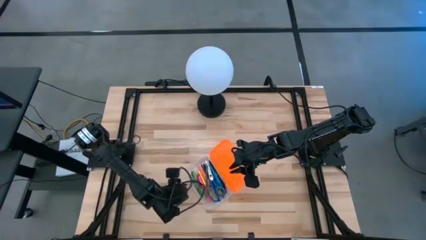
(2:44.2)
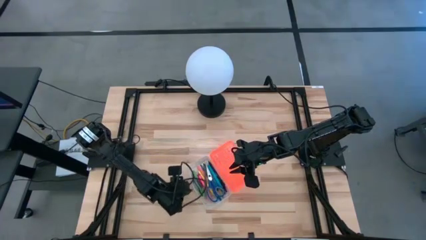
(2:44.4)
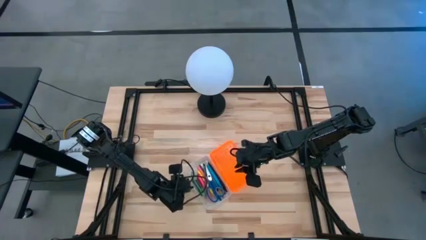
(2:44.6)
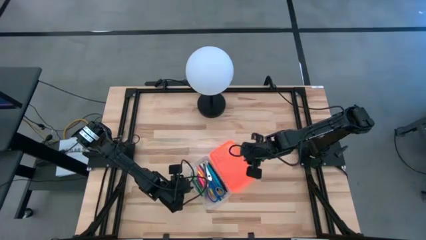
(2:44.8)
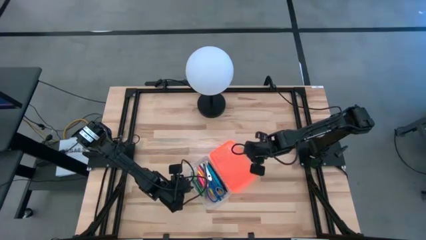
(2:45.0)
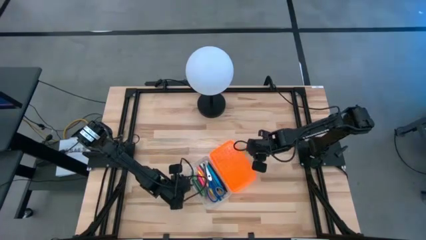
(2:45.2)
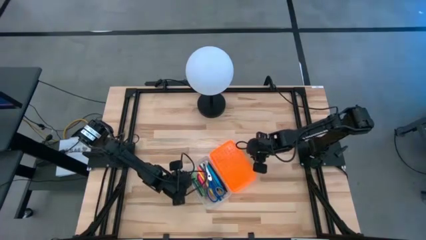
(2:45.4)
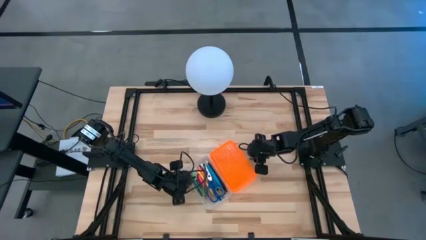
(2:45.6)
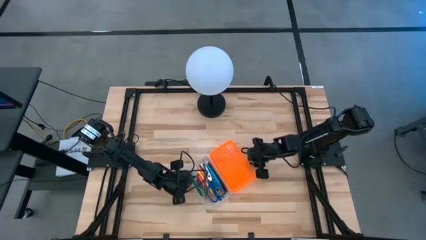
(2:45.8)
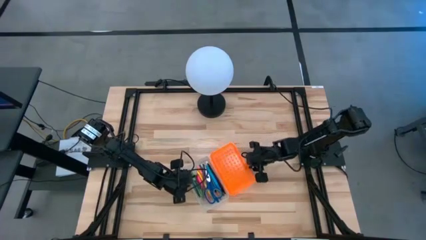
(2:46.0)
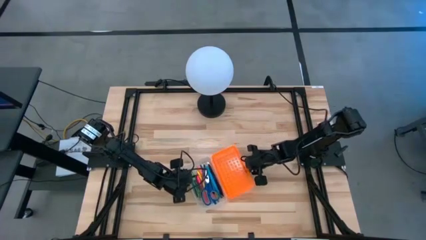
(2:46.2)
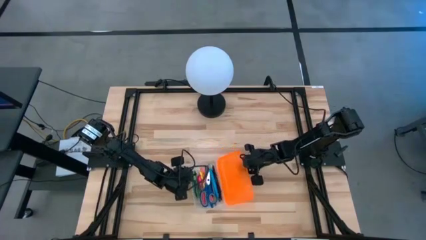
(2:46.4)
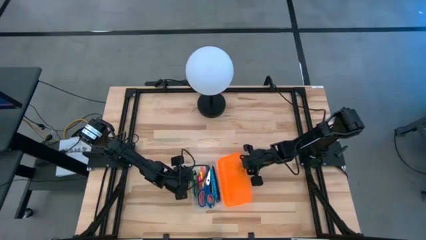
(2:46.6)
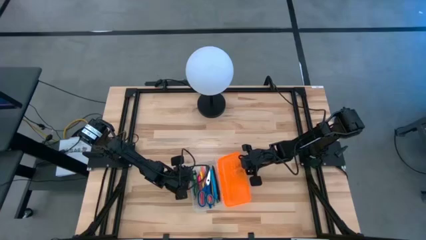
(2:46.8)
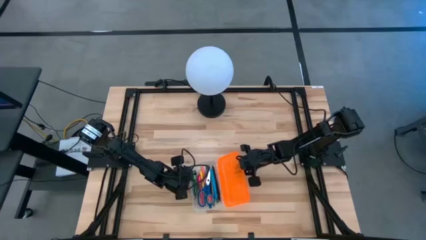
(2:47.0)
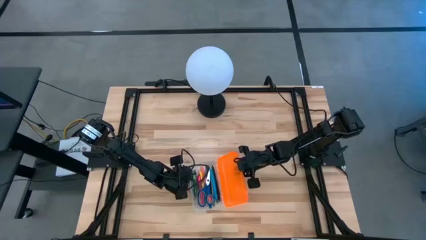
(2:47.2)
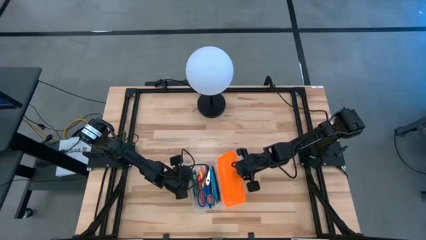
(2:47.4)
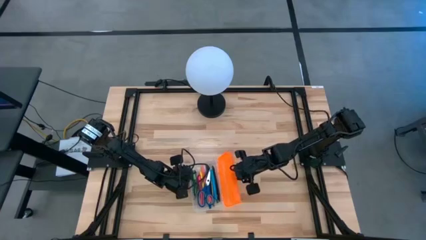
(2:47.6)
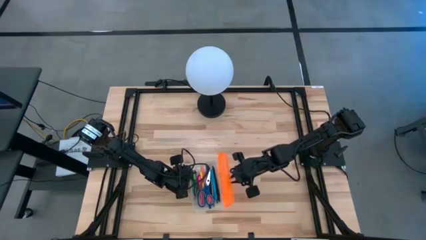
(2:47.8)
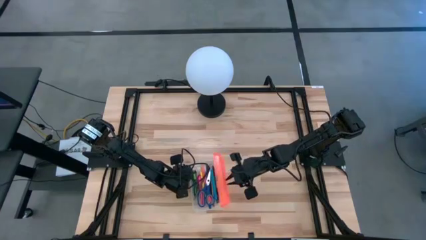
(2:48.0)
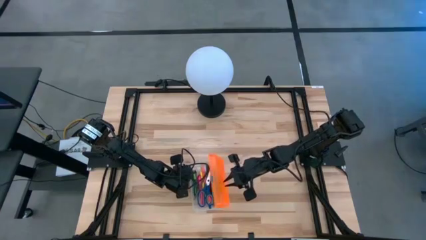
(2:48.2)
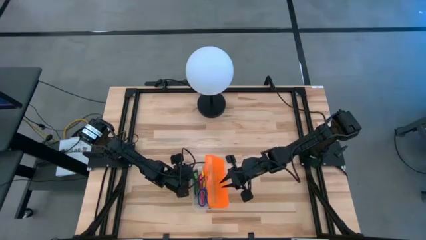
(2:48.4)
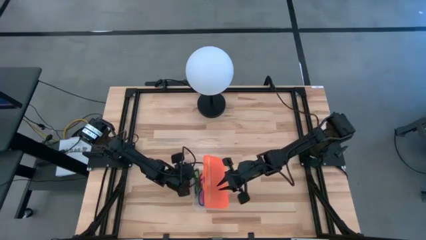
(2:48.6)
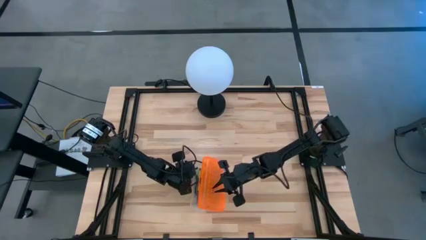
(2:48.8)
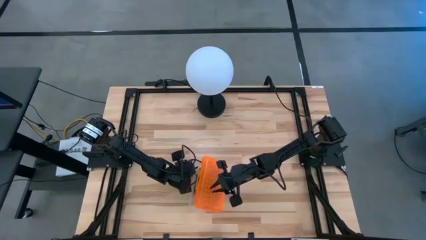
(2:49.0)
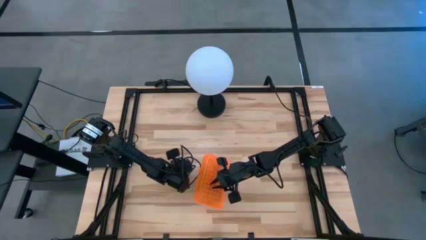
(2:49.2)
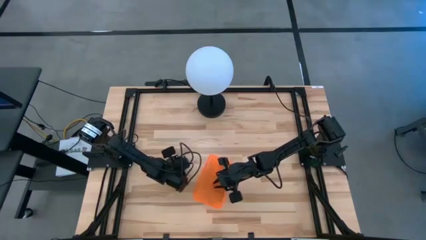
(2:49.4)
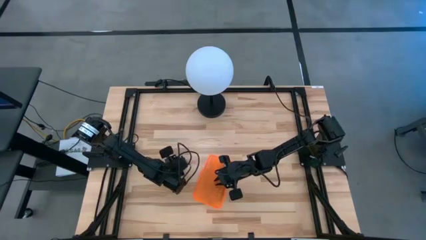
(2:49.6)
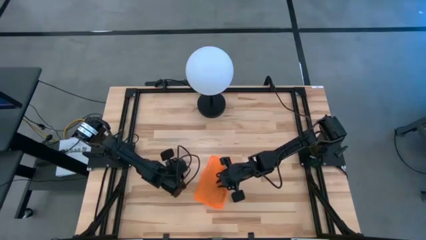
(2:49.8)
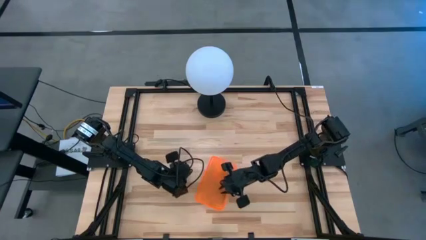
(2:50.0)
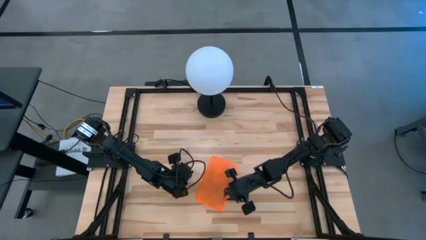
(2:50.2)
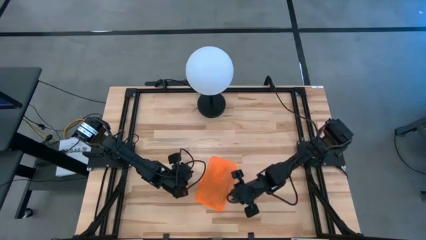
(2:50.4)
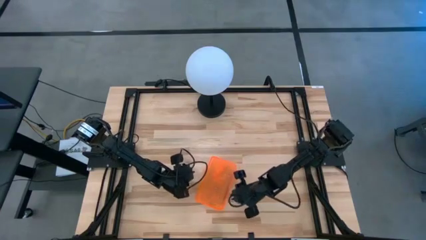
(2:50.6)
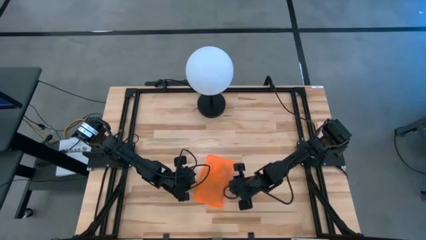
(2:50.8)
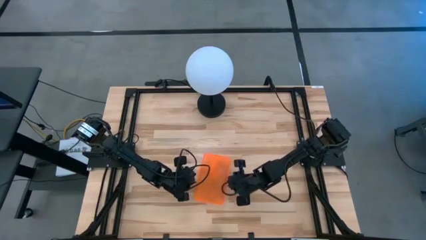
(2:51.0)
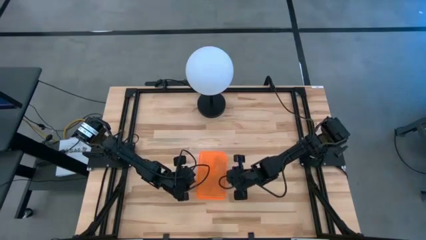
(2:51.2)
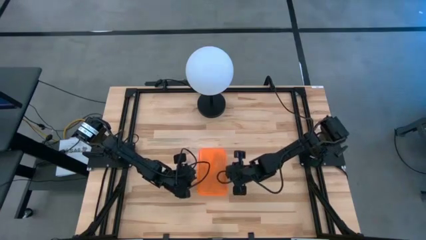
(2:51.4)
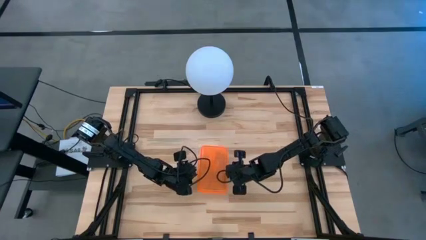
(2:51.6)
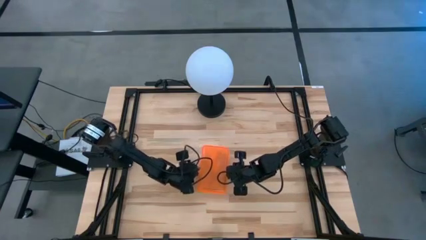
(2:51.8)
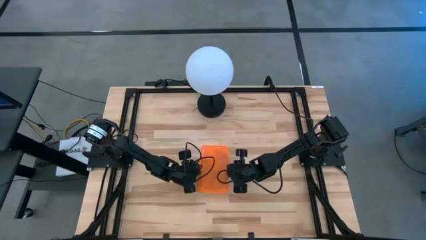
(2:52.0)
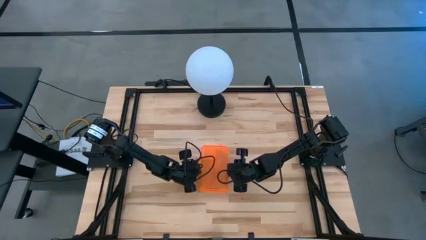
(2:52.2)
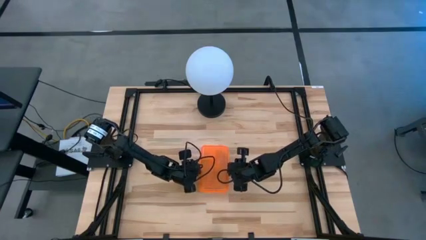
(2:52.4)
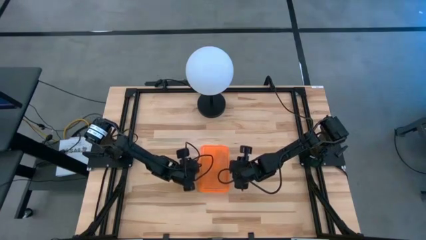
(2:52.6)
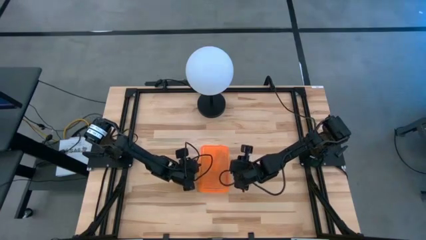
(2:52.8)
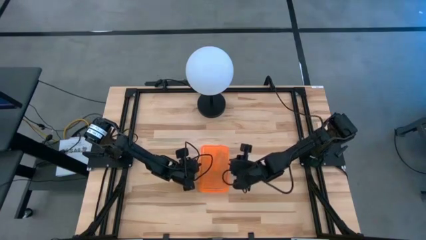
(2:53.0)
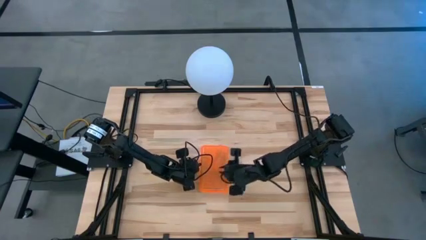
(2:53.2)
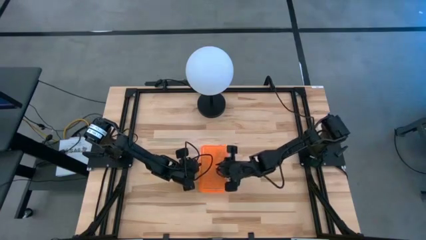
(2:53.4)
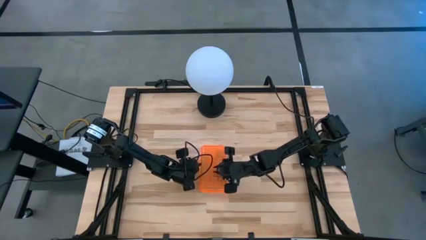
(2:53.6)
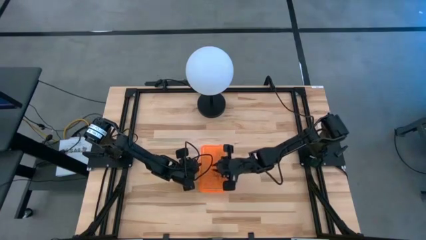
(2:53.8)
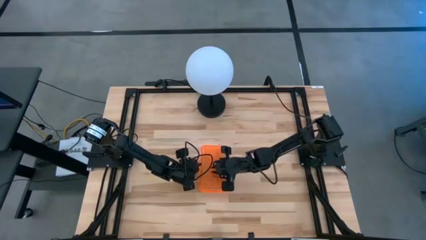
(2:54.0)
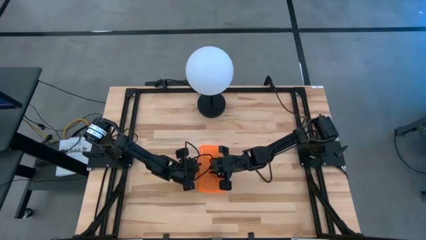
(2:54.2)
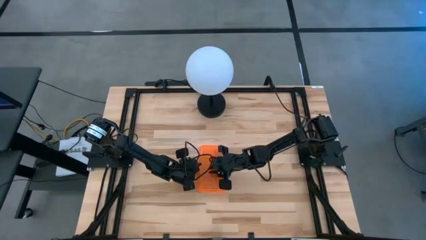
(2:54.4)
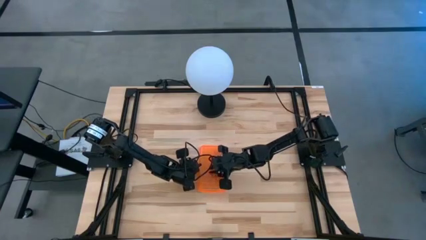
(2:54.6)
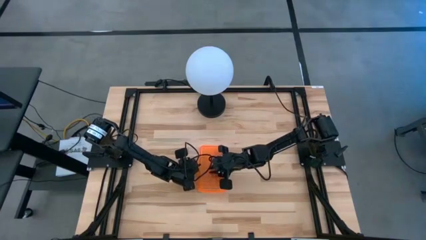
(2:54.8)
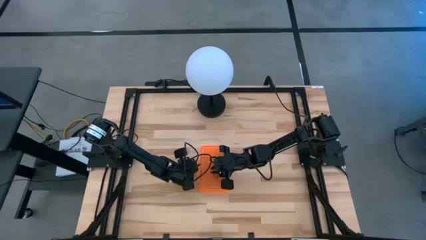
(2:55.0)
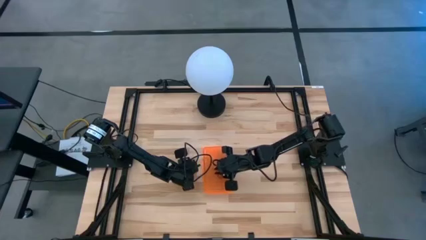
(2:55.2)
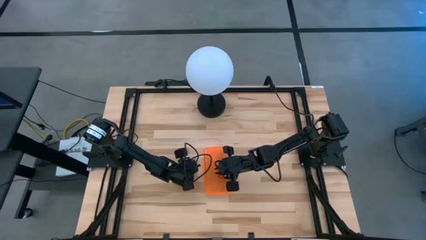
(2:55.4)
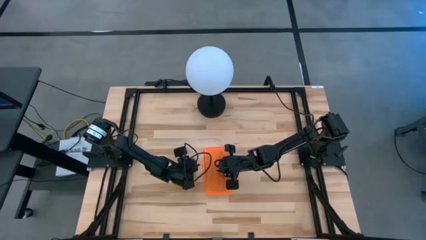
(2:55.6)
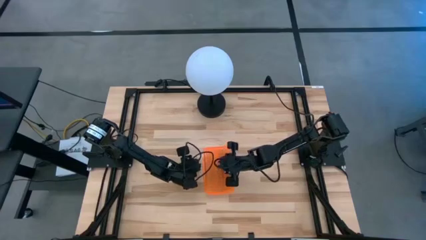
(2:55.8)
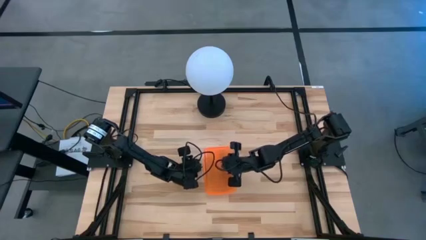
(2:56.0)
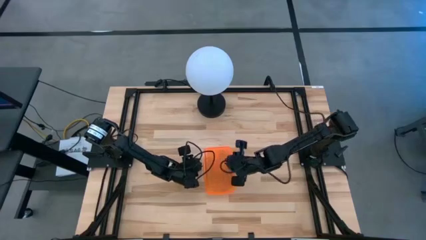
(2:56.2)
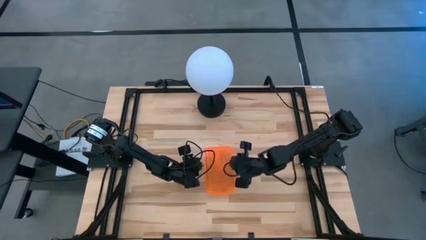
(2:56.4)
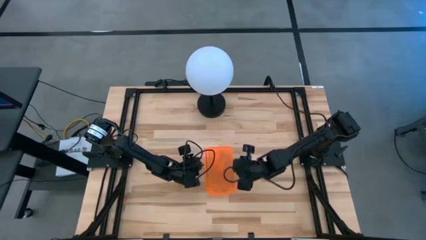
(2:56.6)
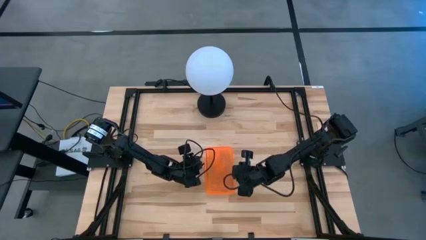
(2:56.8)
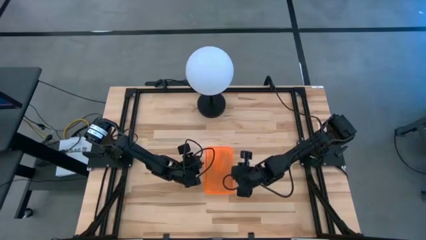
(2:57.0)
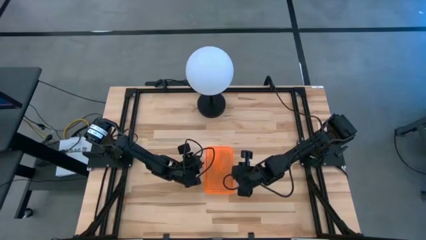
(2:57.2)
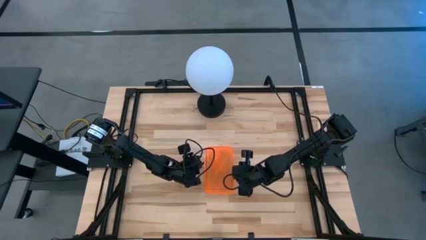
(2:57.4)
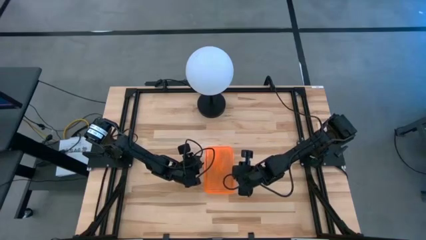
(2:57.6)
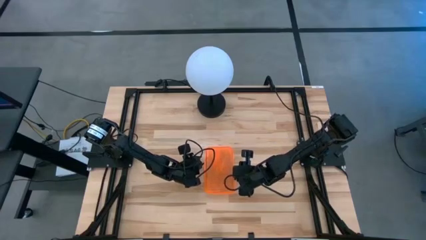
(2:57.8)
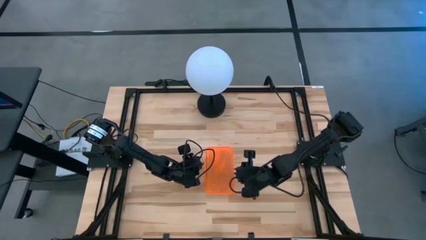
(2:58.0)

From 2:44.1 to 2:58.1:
Task: Pick & place school supplies into a supply box
Close the orange supply box

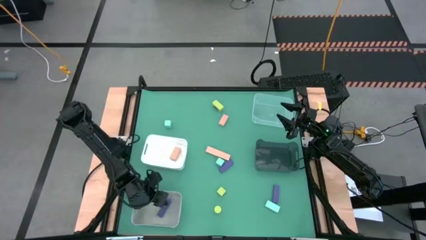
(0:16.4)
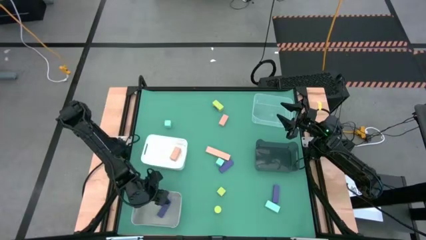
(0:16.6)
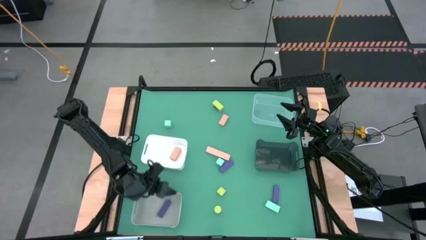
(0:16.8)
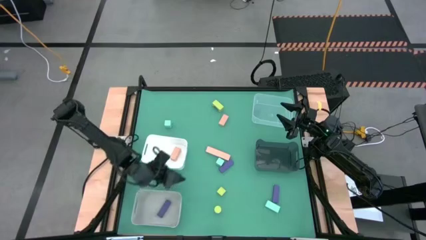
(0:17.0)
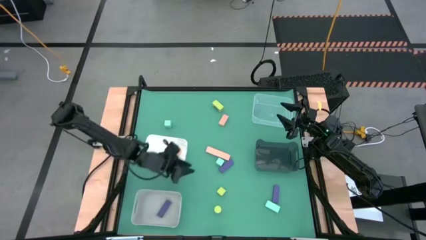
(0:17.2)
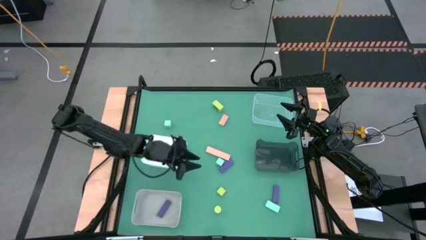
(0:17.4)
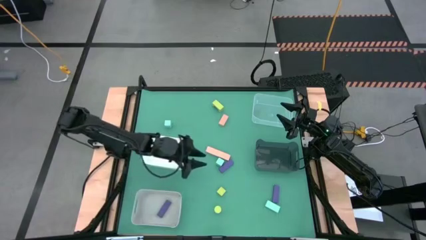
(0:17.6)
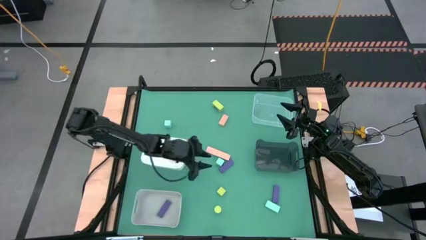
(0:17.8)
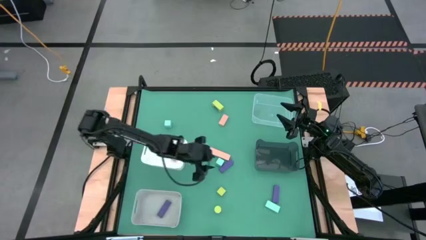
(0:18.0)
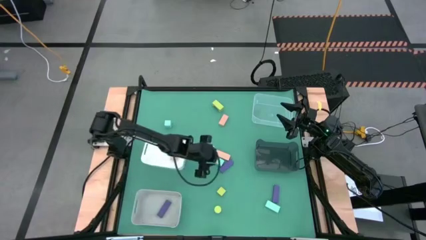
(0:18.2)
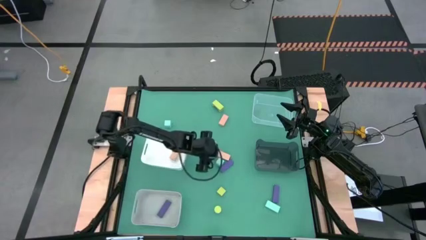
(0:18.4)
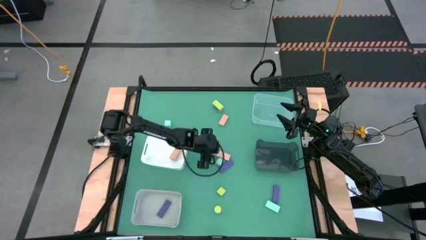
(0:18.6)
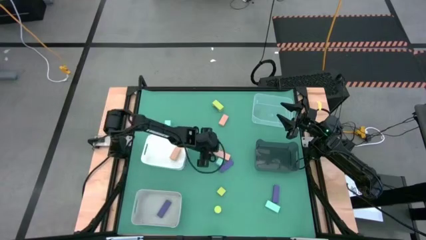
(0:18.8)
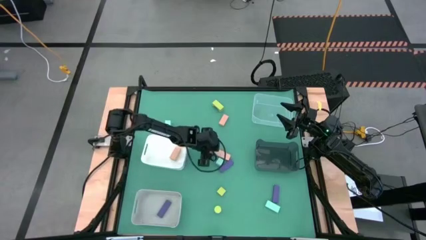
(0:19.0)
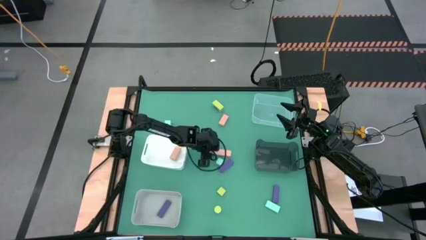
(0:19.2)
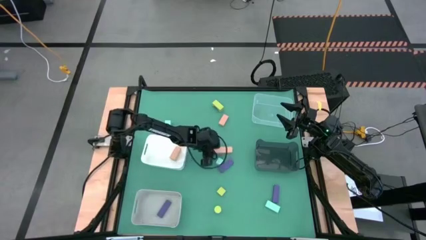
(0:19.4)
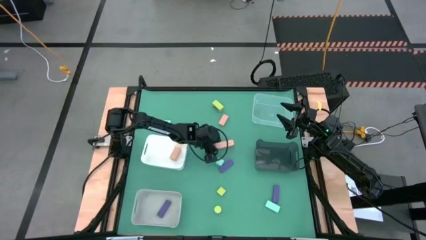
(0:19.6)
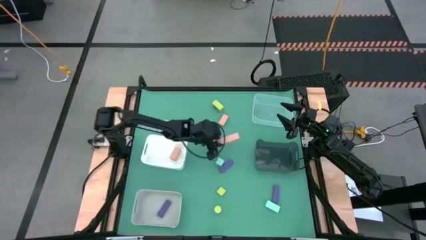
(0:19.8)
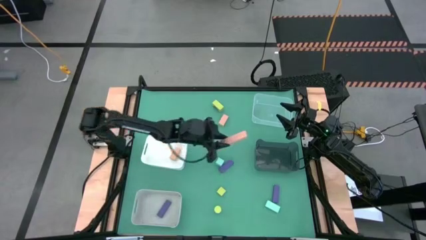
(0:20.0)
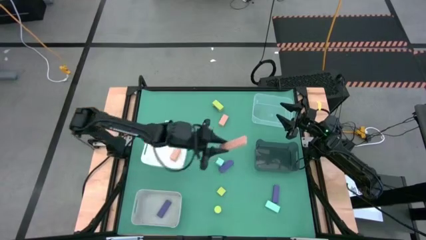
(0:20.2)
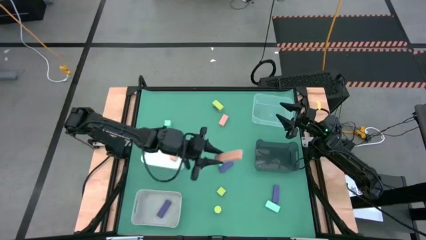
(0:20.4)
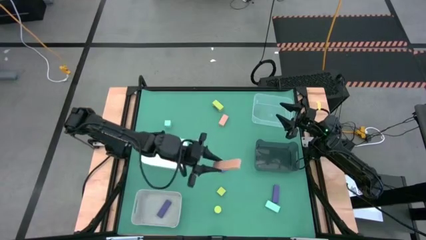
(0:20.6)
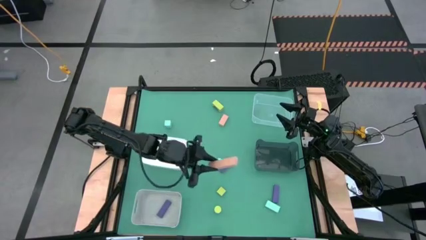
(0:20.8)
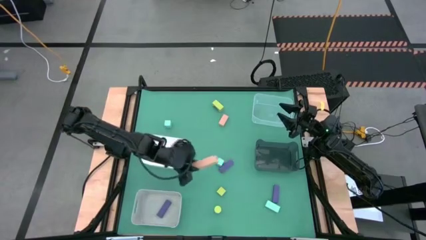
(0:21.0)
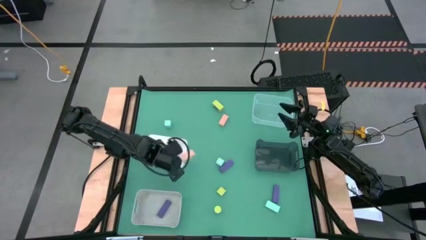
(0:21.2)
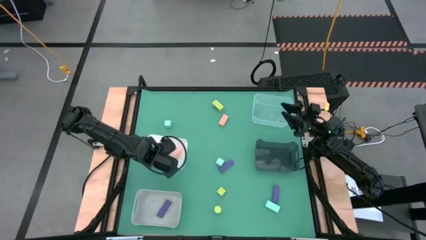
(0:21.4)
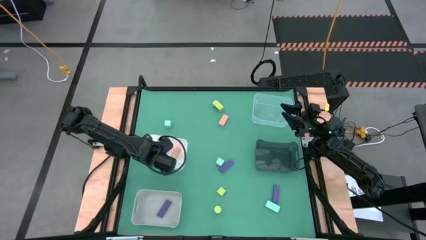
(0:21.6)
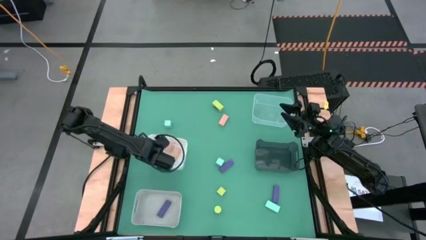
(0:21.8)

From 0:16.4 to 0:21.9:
Task: Sort & place blocks by color
Put the bottom brown block into the white bin
